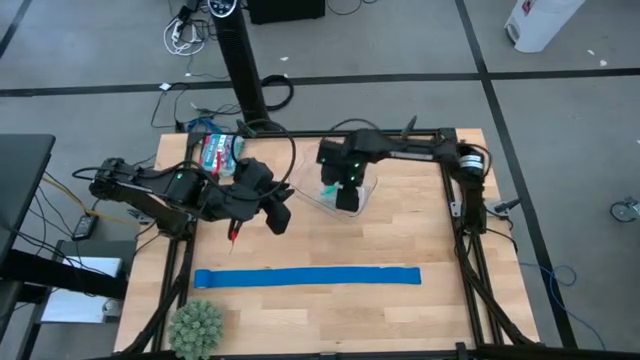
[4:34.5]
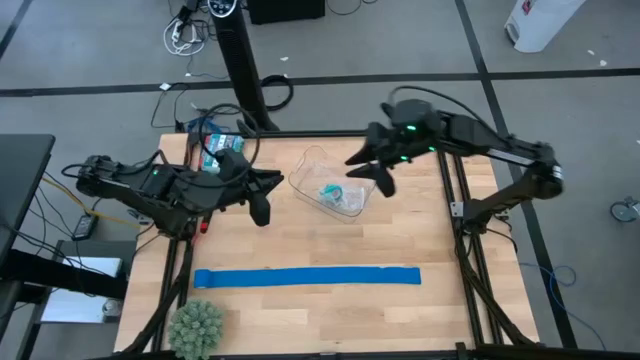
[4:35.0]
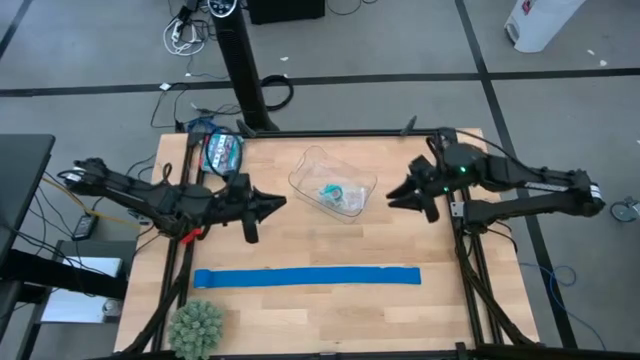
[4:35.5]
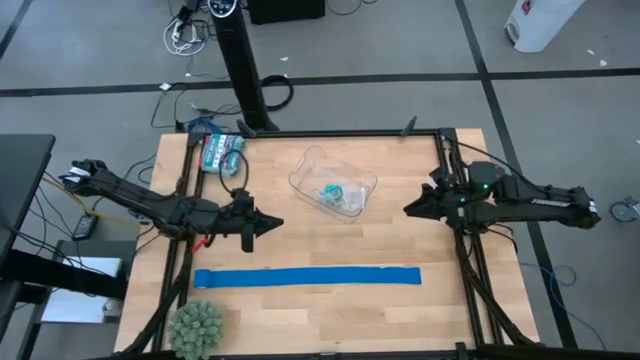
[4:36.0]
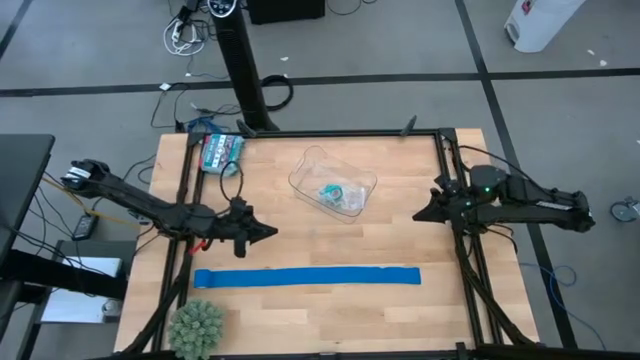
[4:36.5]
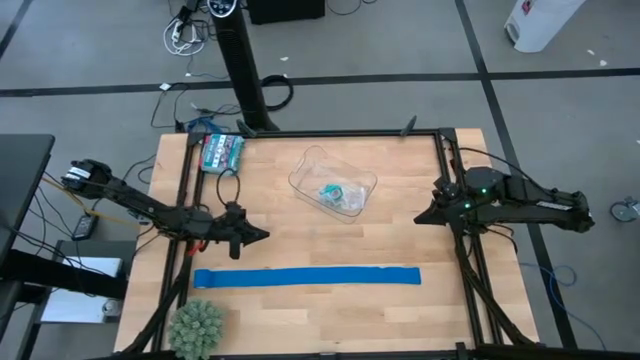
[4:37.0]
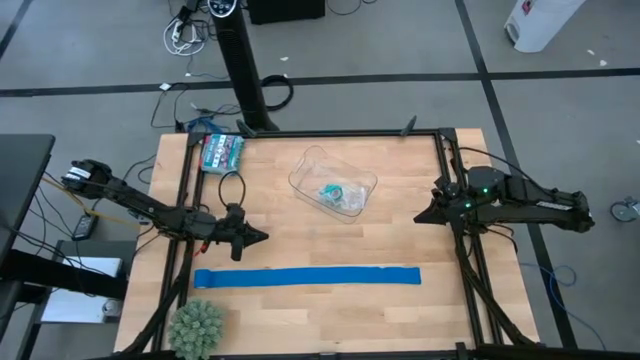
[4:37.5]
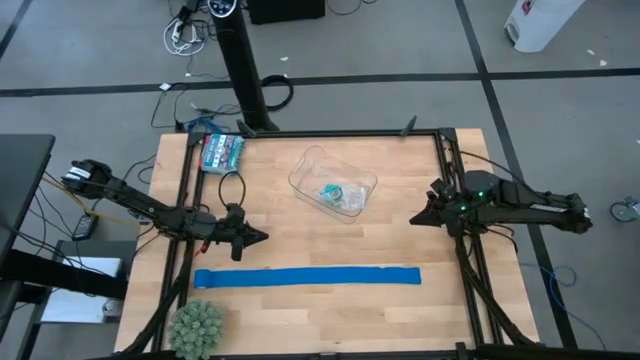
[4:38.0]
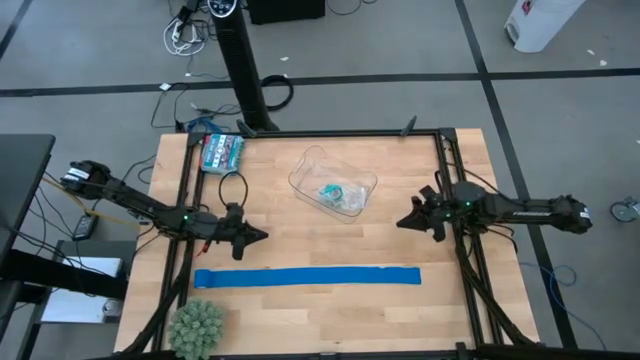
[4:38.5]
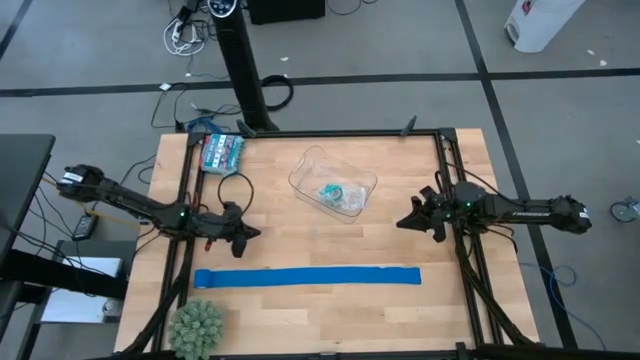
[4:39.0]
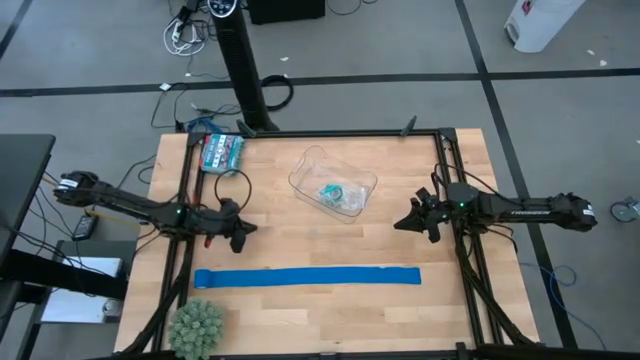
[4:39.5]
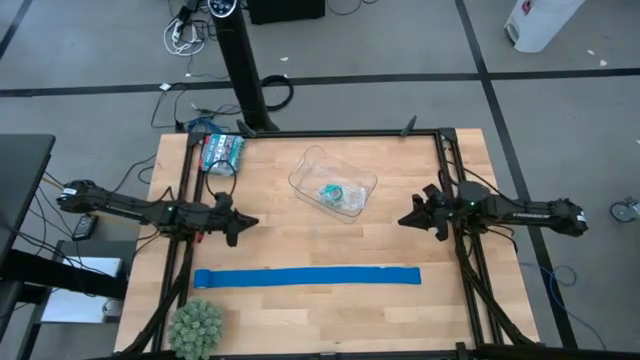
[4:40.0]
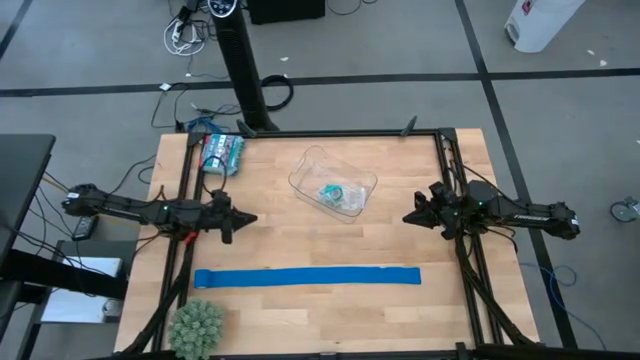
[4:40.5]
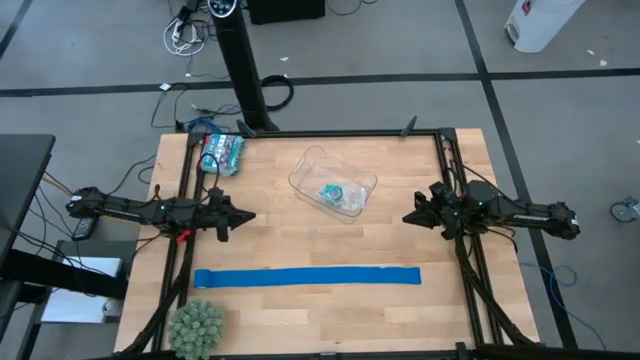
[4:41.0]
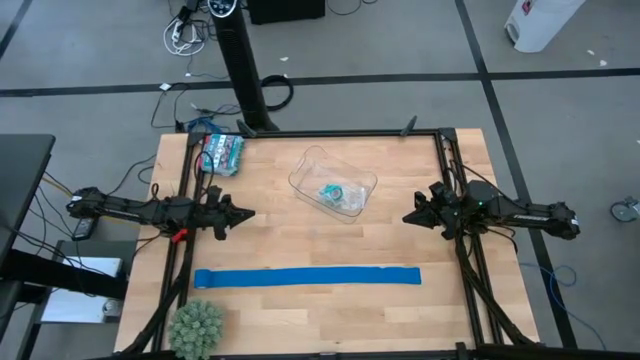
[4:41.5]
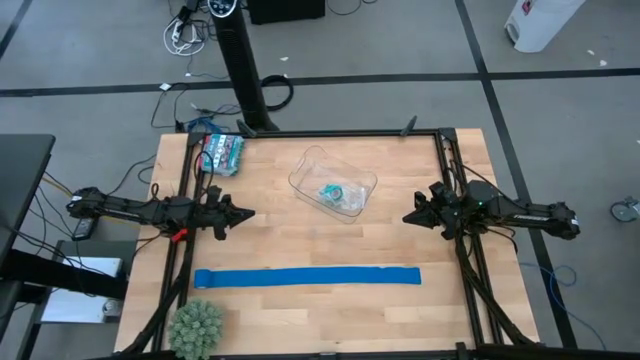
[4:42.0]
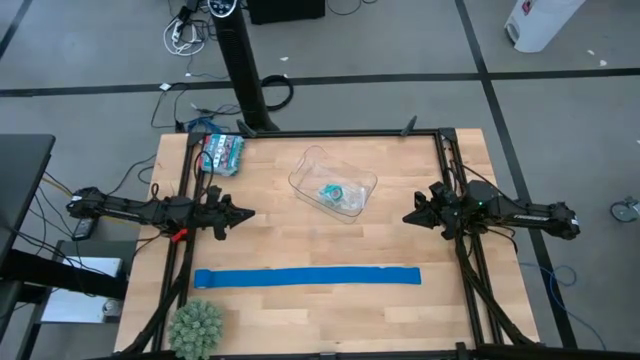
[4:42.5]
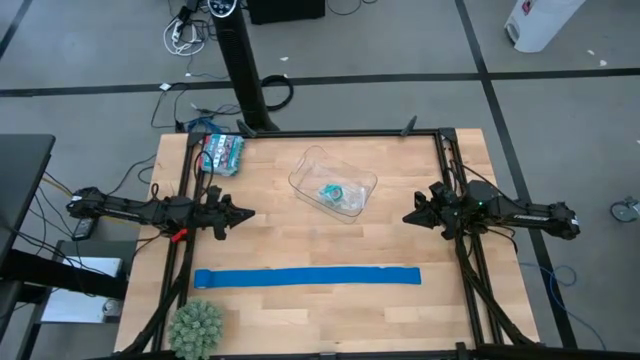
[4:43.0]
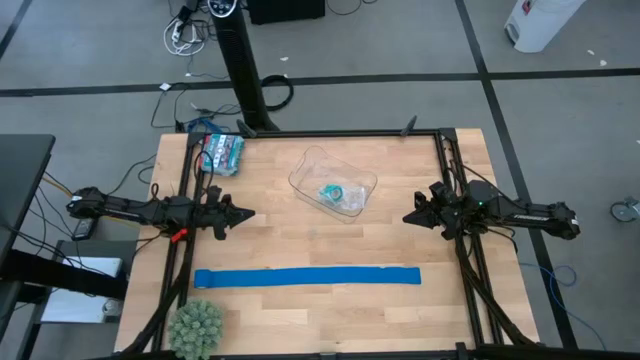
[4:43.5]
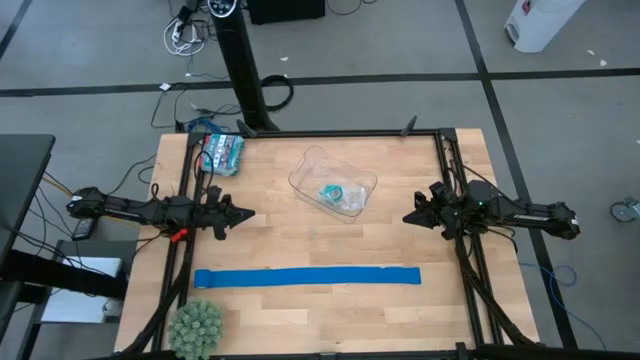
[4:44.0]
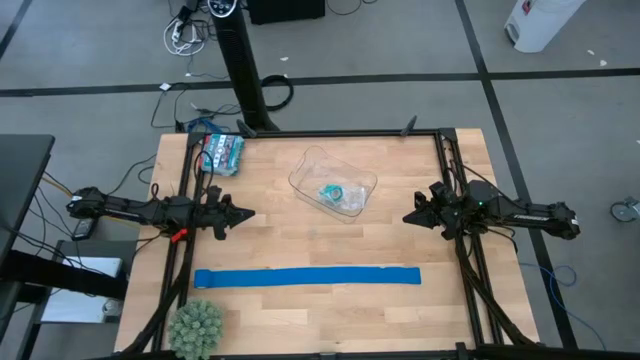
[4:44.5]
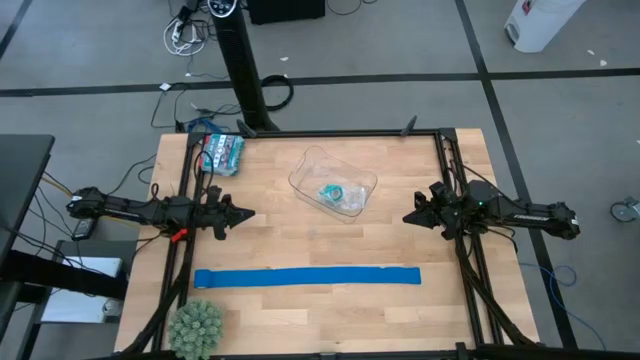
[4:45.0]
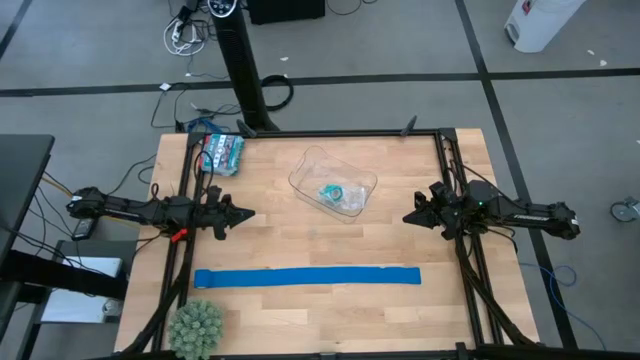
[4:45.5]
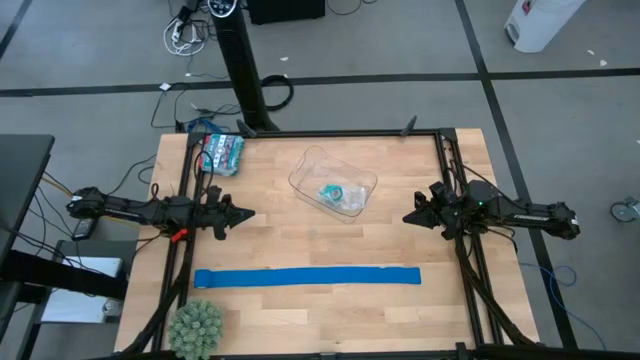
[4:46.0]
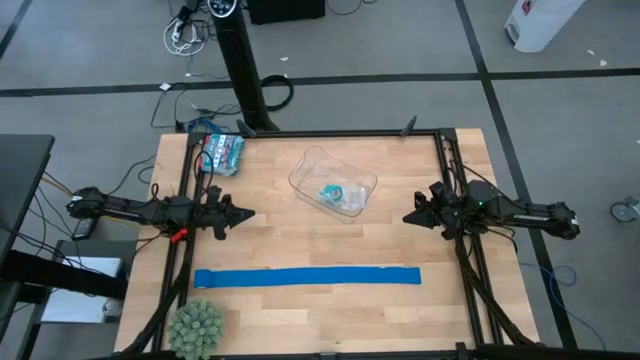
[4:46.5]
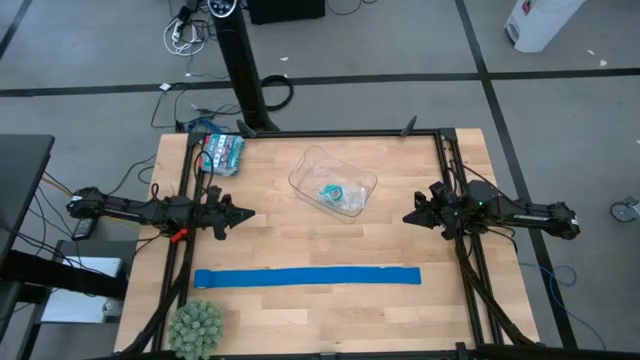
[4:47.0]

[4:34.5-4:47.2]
Task: Roll bandage
Return to Home Position

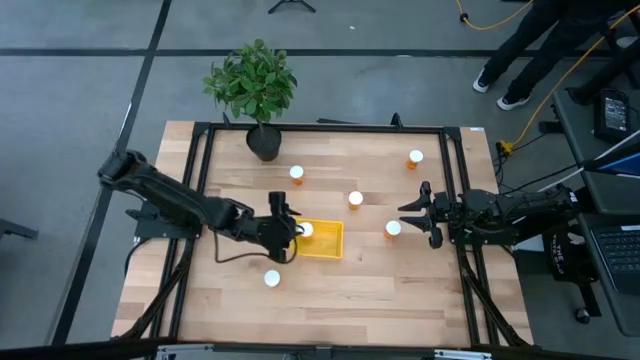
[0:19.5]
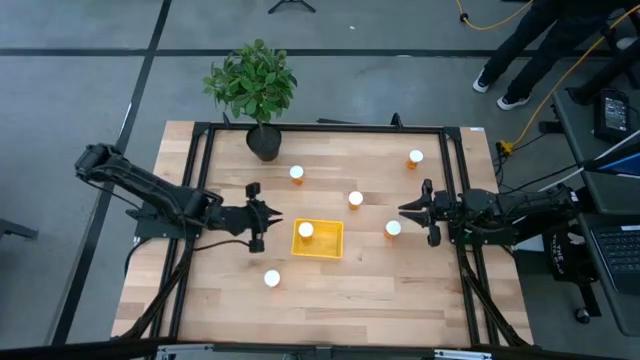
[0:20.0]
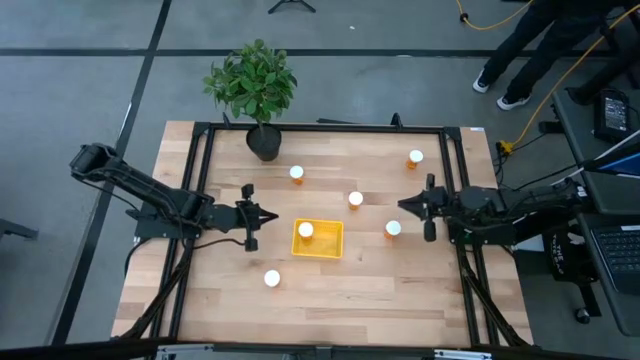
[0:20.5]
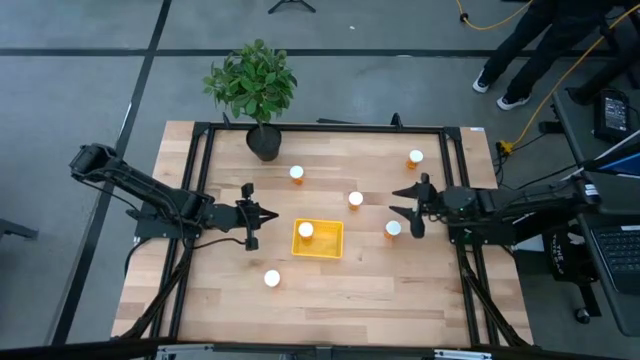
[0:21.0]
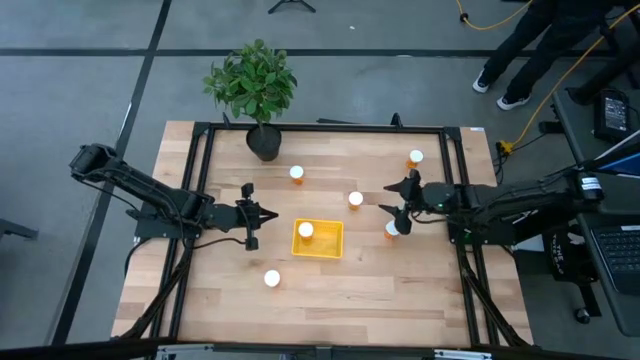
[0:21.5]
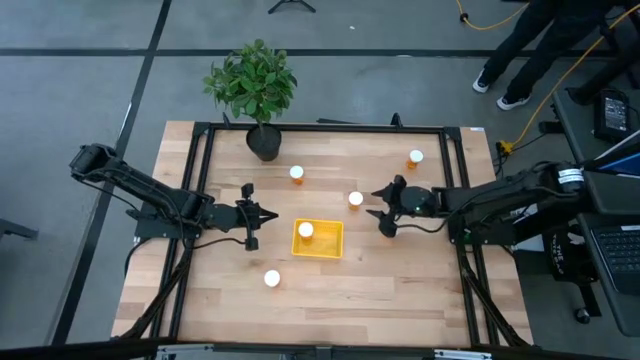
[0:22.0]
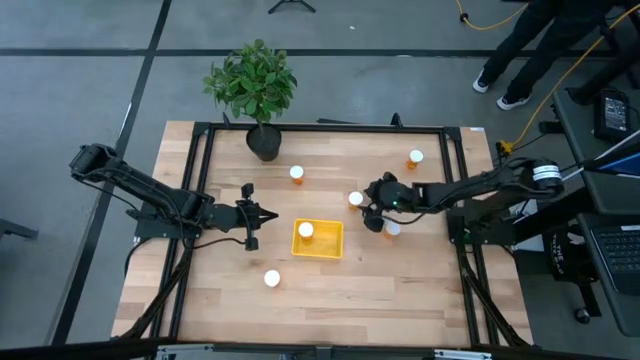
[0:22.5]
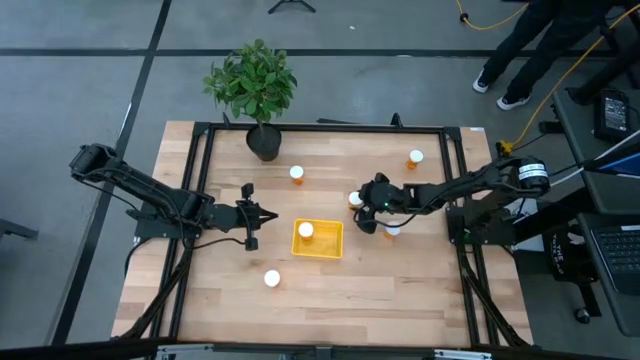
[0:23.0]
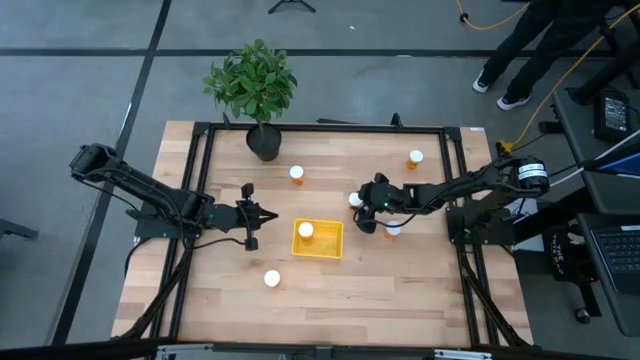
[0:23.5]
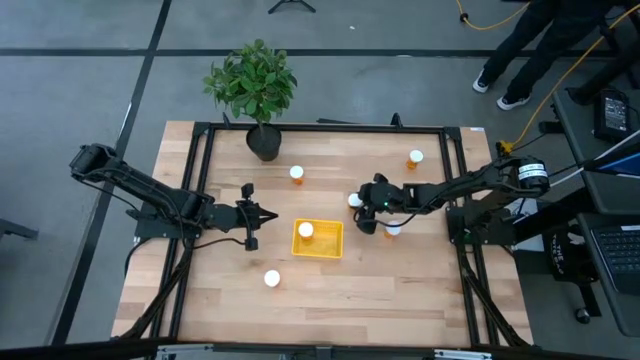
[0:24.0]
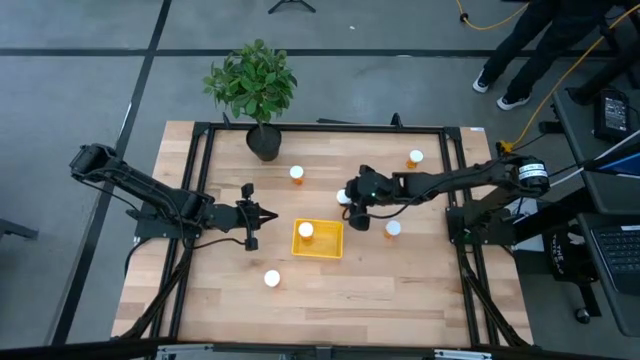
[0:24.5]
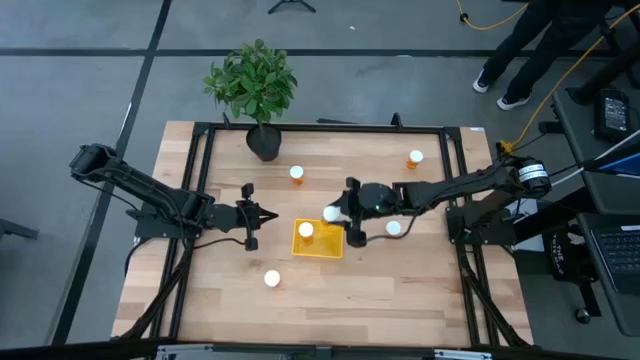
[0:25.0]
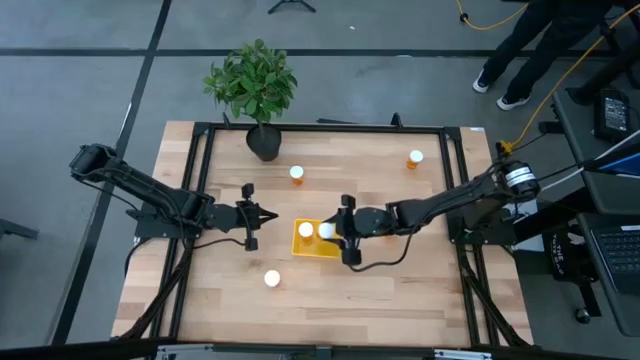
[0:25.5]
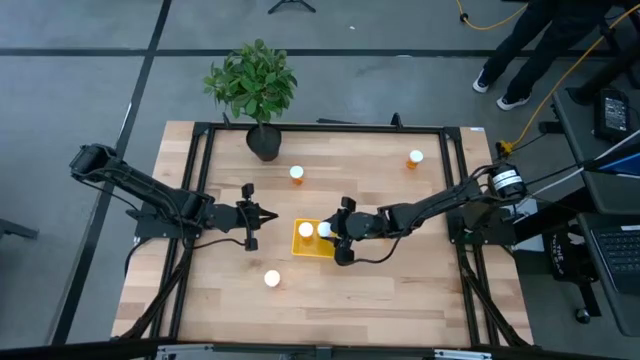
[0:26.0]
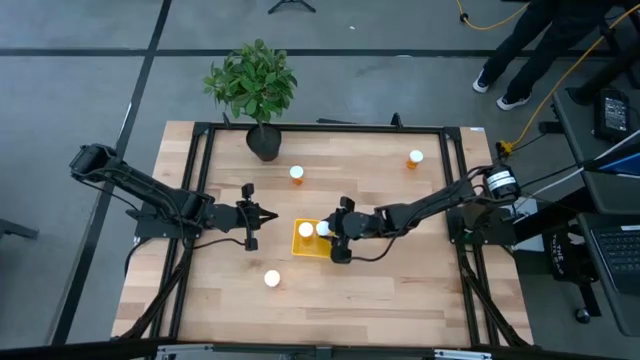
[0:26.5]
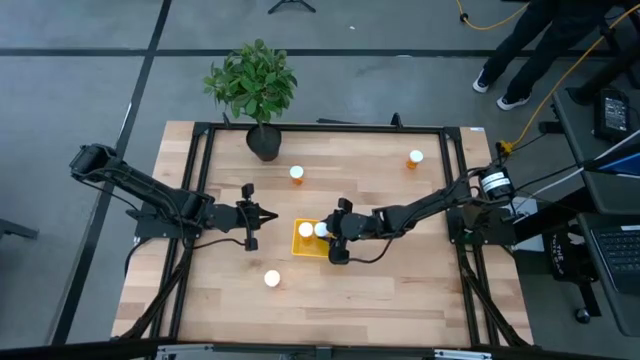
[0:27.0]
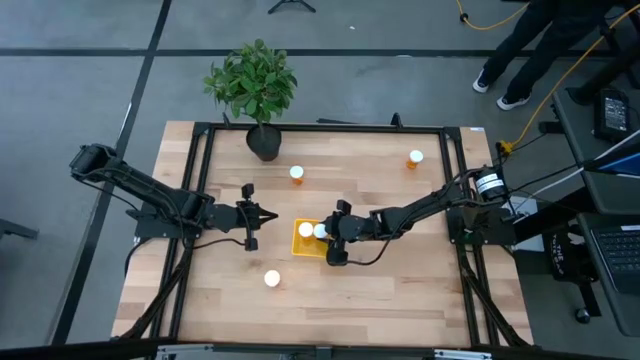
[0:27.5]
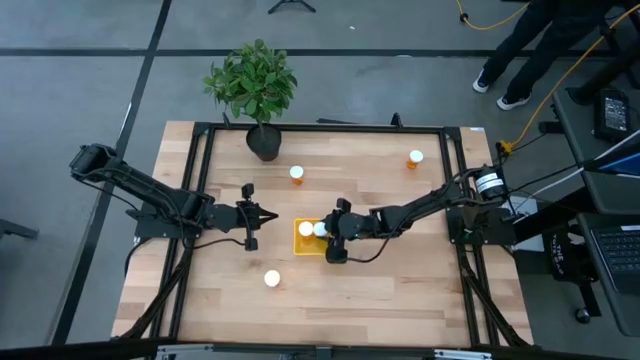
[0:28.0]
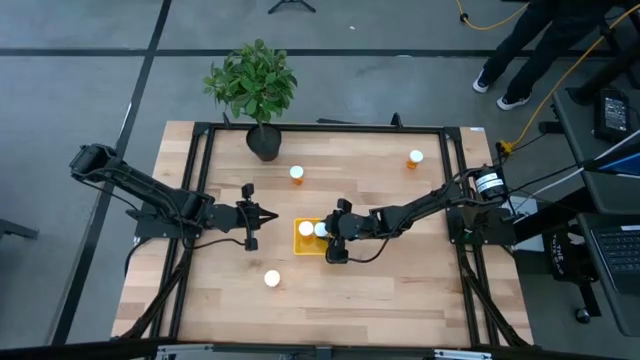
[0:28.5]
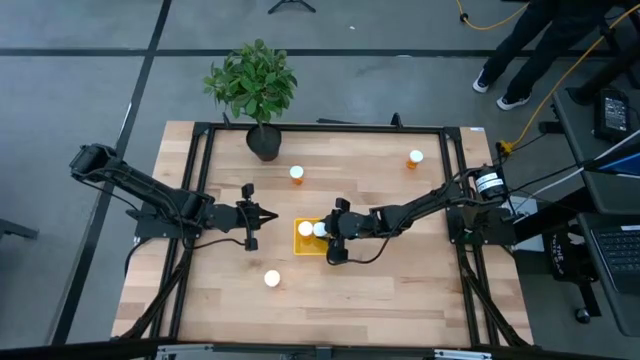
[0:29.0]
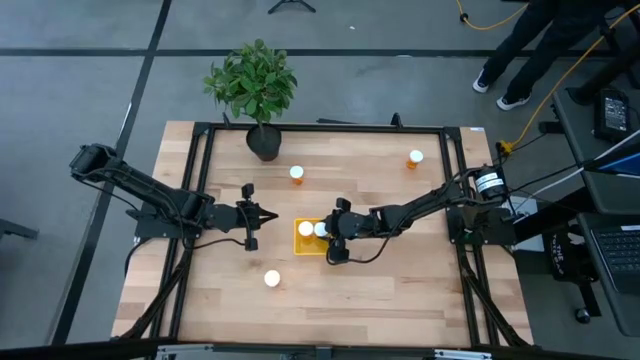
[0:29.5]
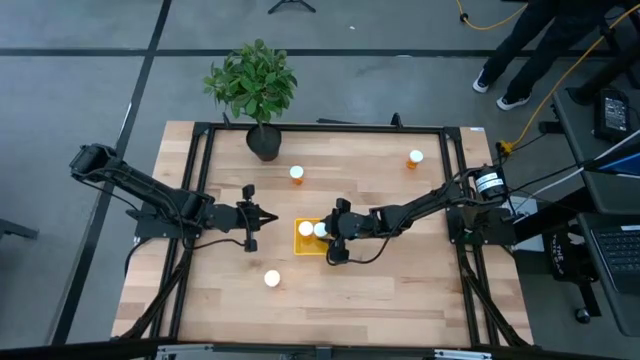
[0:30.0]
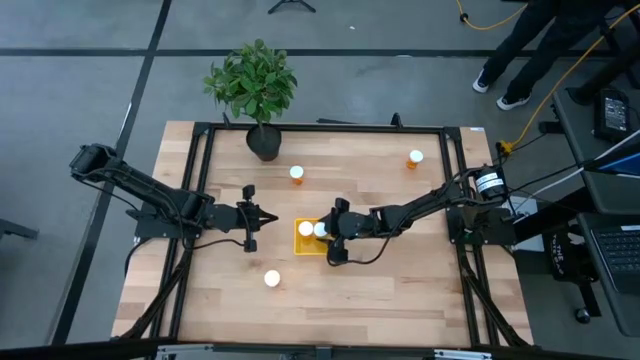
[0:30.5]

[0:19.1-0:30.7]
Task: Pick and place pill bottles into a basket
Put the orange pill bottle into the yellow bin
